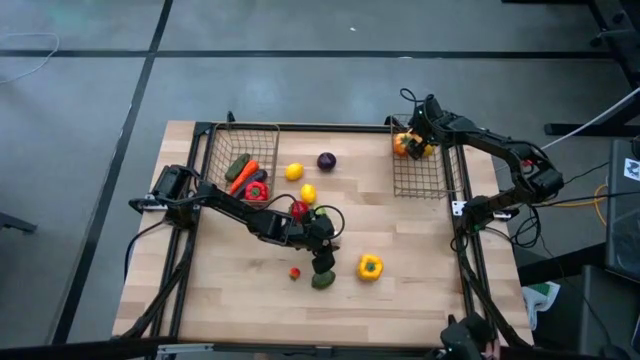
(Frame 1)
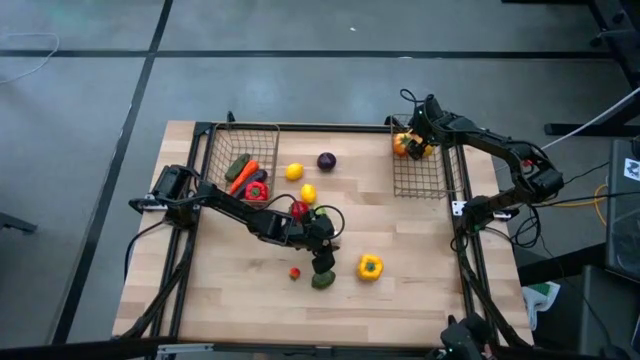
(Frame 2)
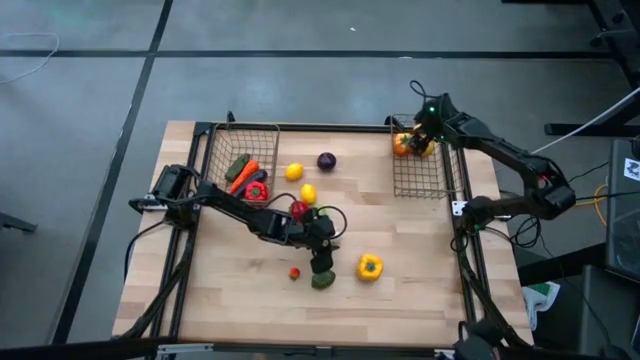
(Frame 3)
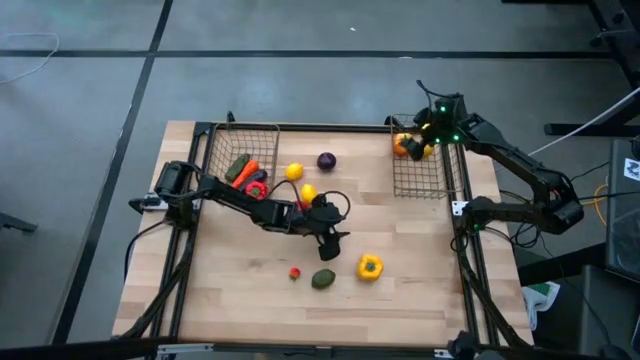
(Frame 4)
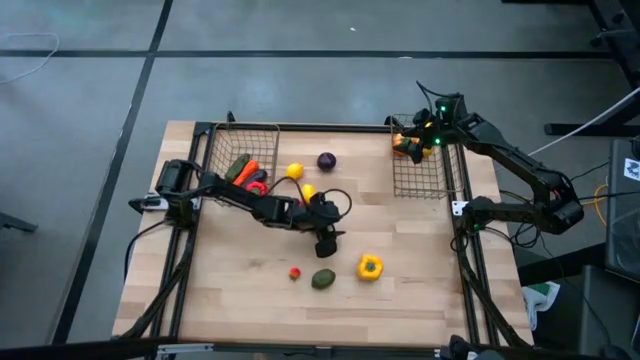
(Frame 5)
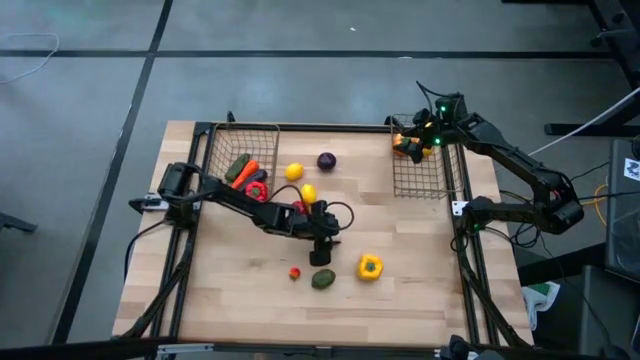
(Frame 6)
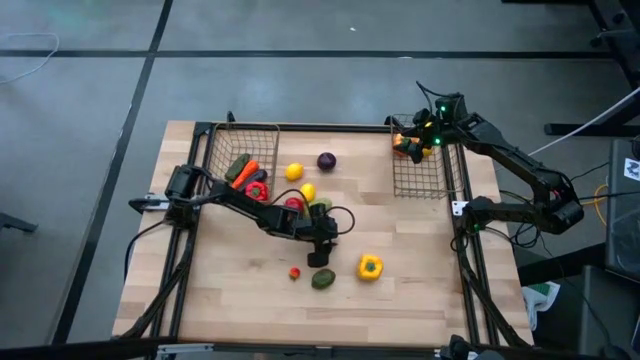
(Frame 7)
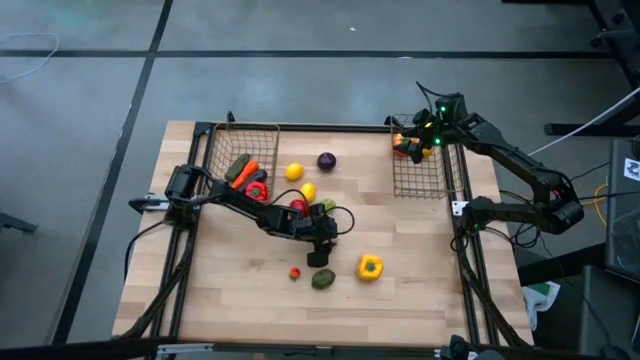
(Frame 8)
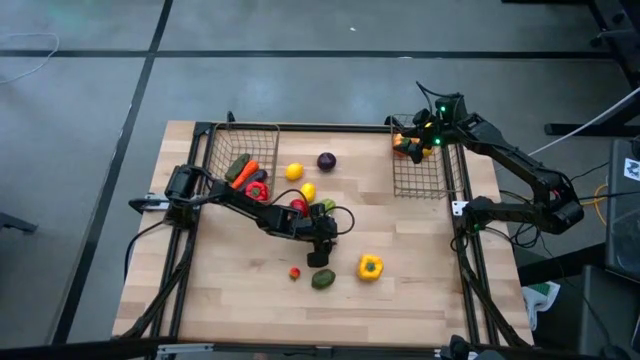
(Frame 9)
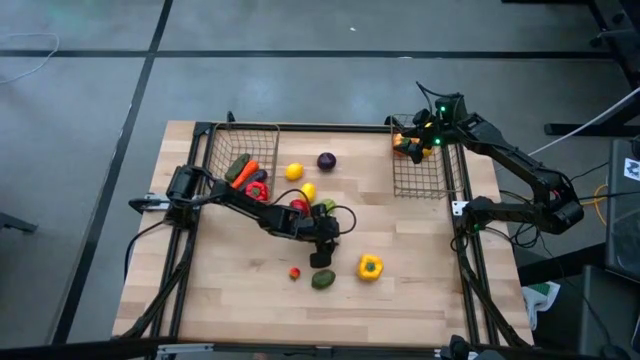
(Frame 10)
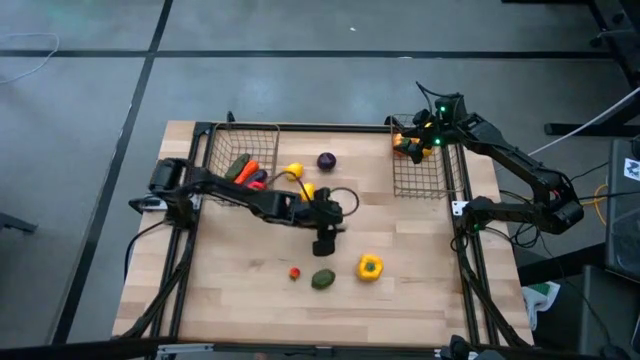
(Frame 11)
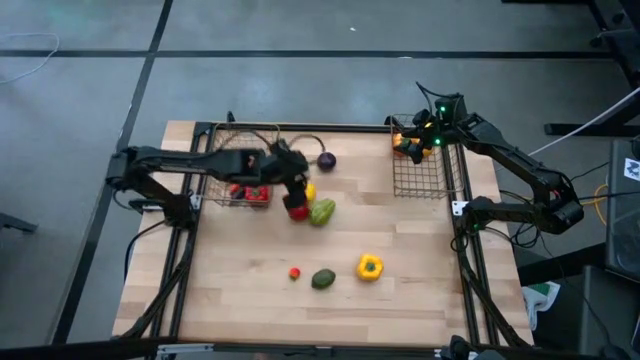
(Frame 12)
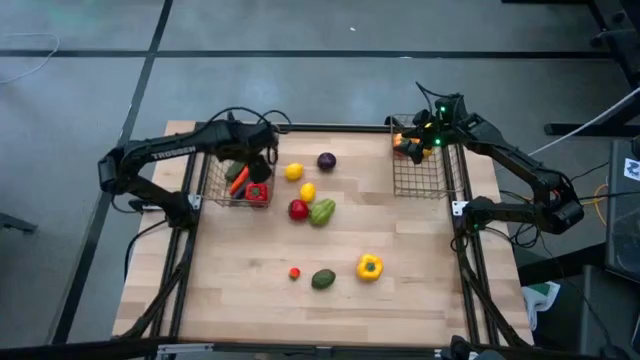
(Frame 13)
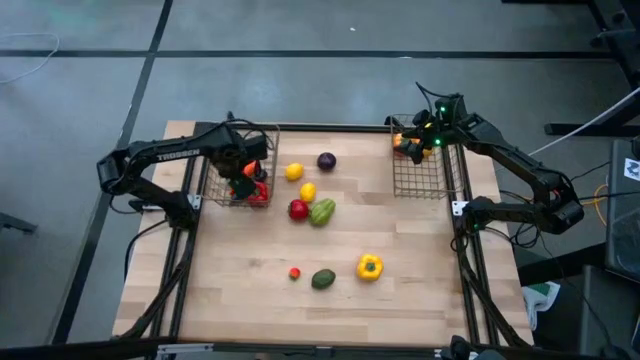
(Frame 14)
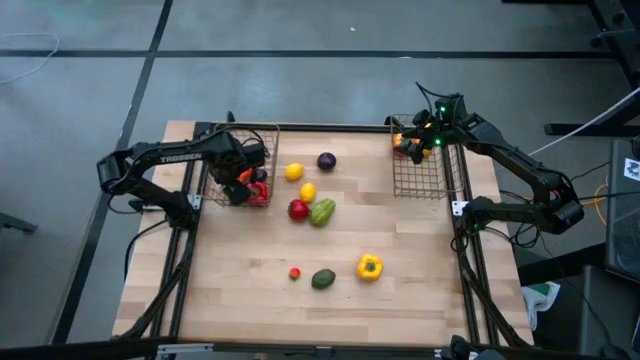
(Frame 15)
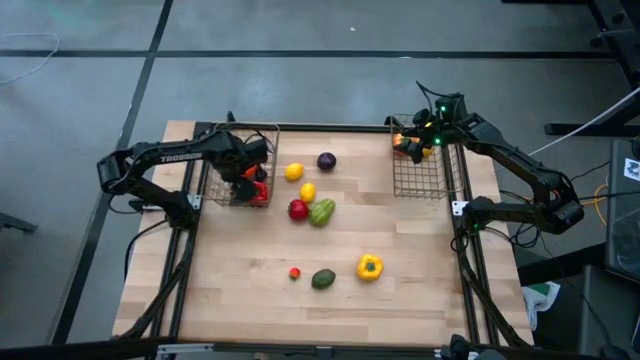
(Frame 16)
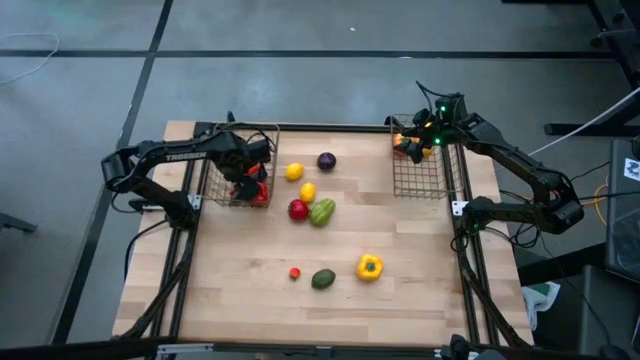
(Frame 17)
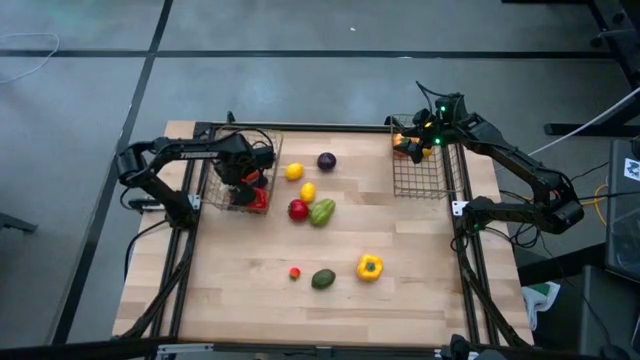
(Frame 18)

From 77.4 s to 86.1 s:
Task: Sort produce into baskets
Put the white garlic into the left gold wire basket

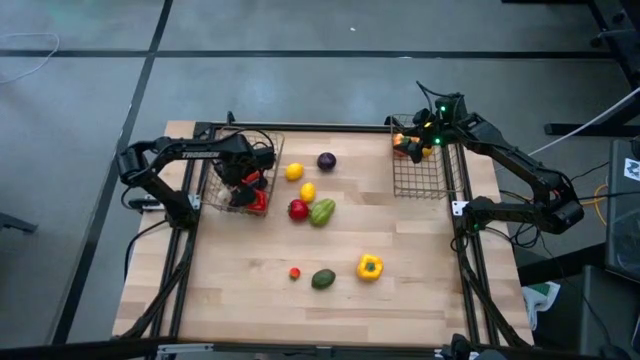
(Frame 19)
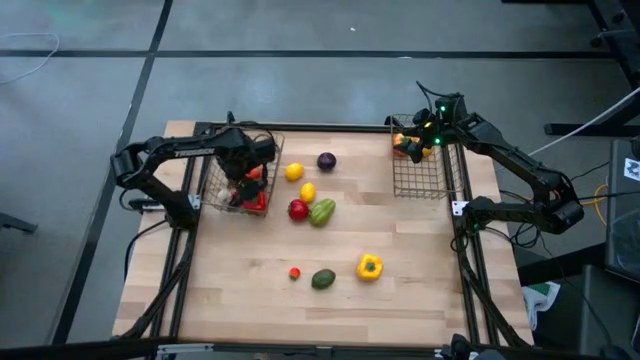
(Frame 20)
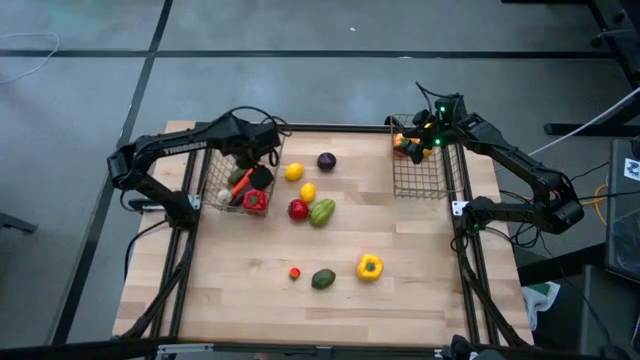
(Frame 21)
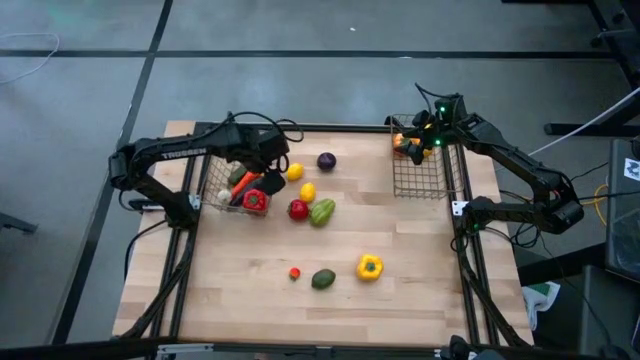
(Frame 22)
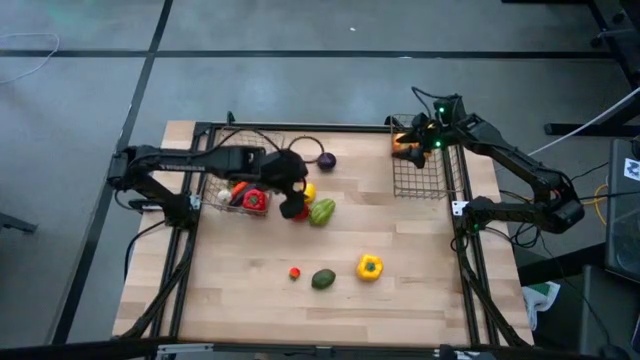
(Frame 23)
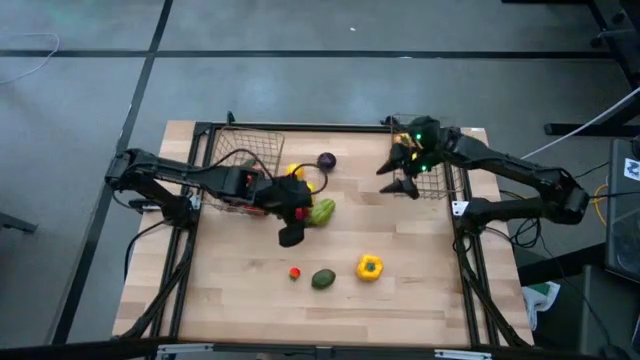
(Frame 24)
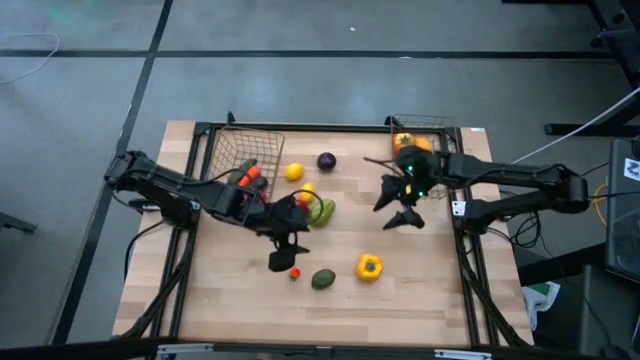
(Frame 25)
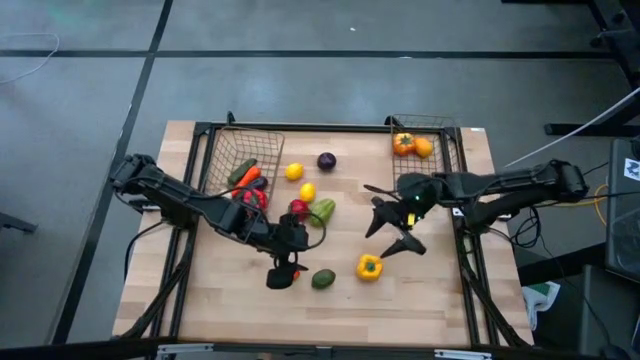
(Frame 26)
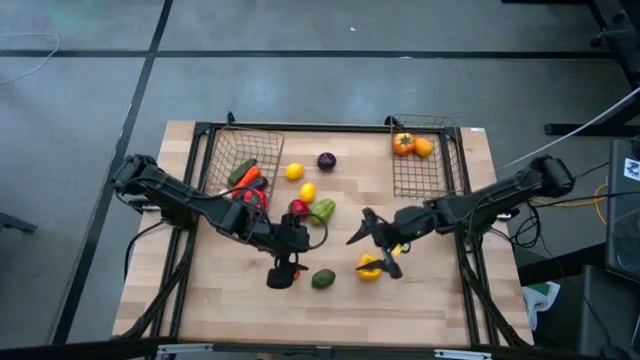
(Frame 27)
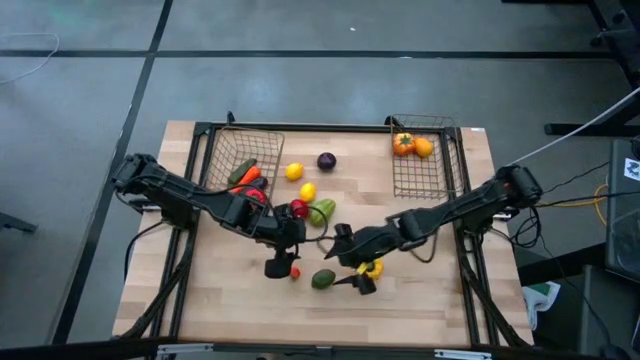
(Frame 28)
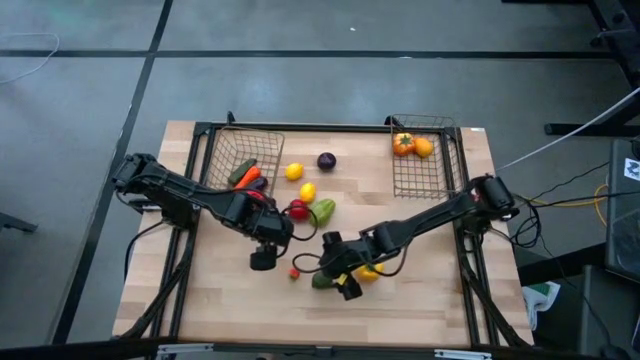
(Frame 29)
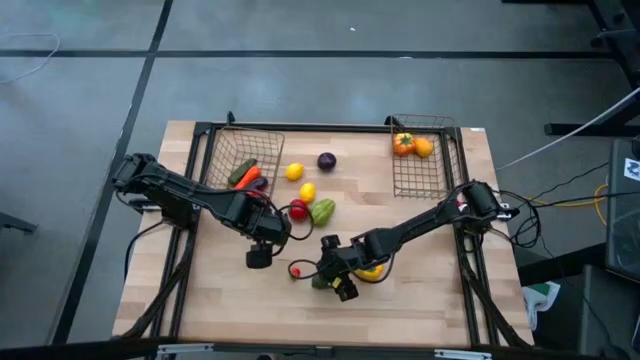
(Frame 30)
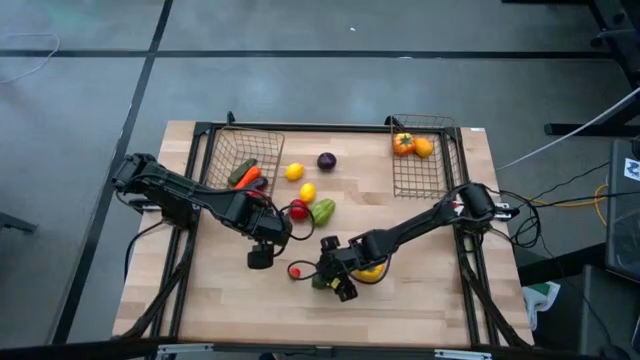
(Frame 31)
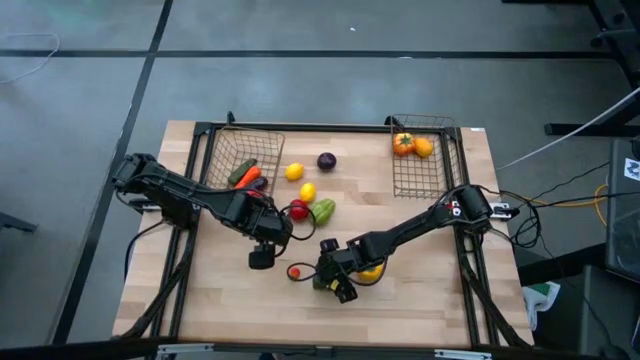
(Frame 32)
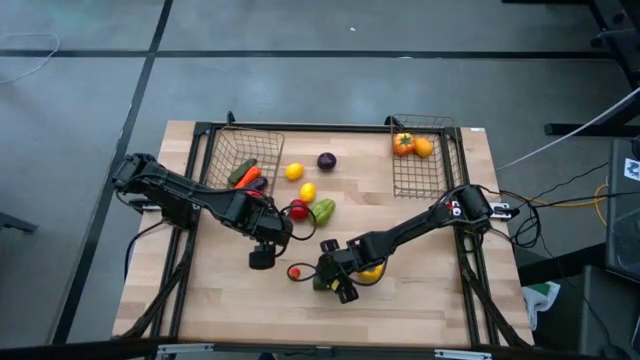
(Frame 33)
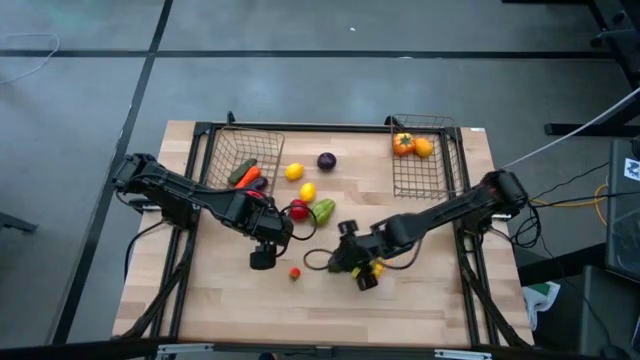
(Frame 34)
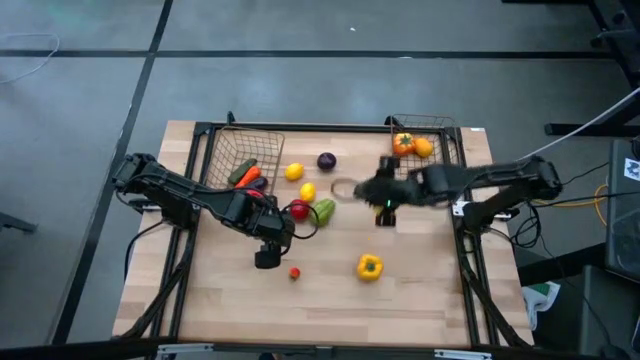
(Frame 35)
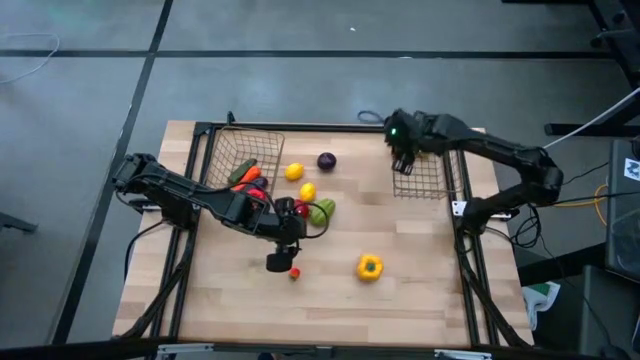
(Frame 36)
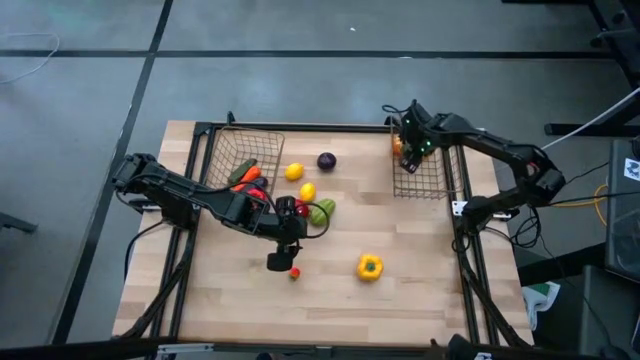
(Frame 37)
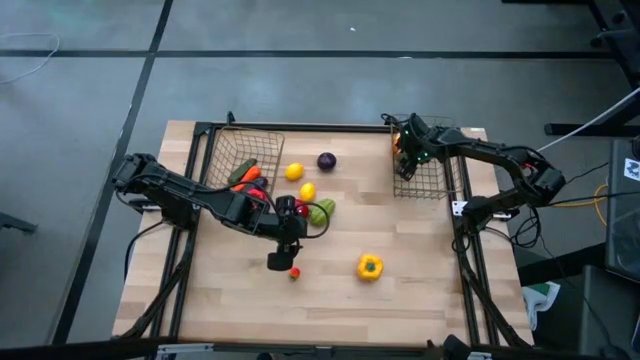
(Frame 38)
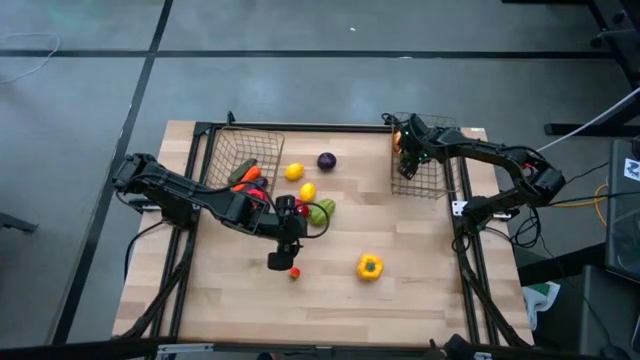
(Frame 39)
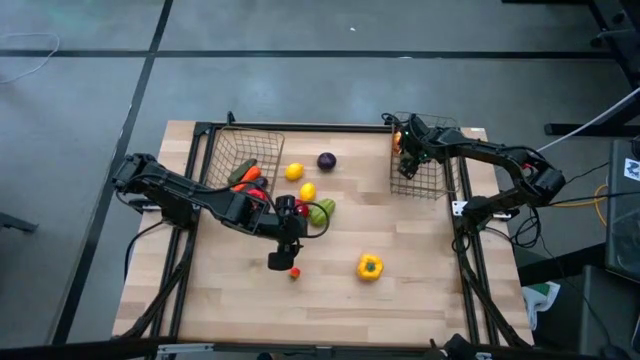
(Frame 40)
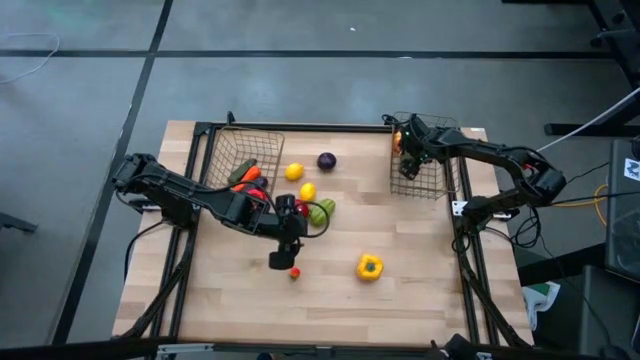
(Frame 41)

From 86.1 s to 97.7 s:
Put the green lime into the right gold wire basket
